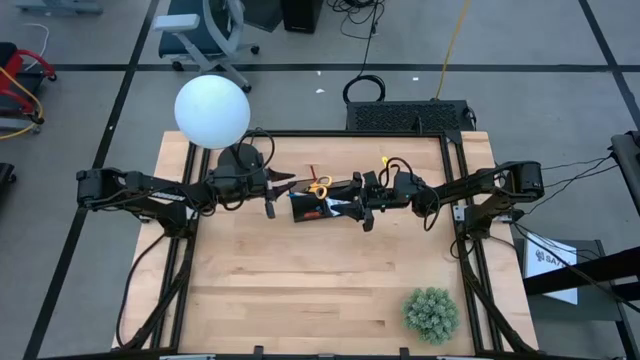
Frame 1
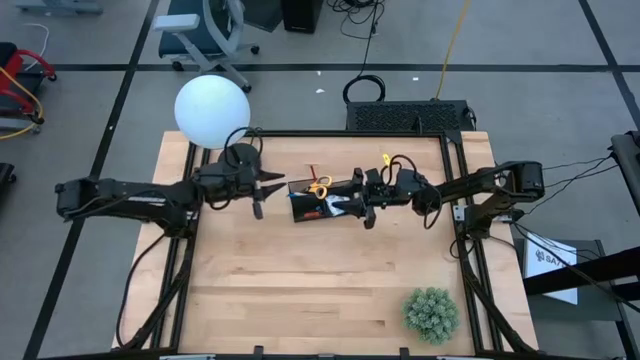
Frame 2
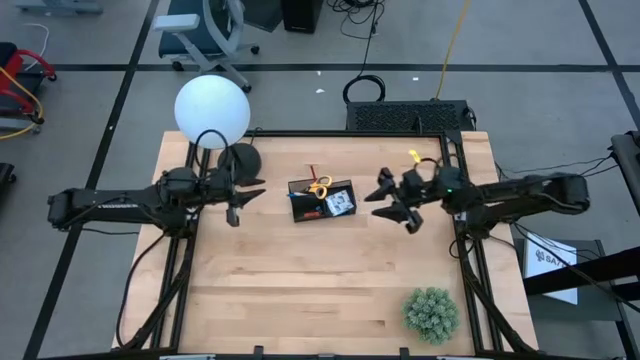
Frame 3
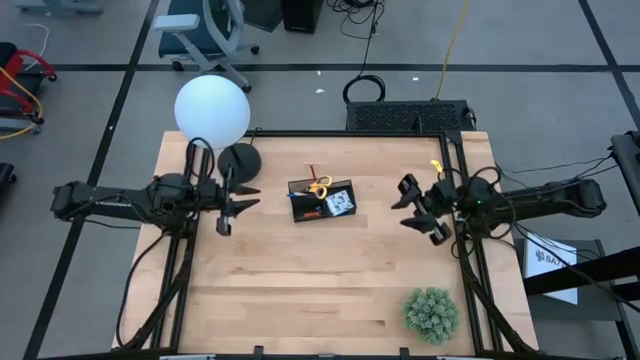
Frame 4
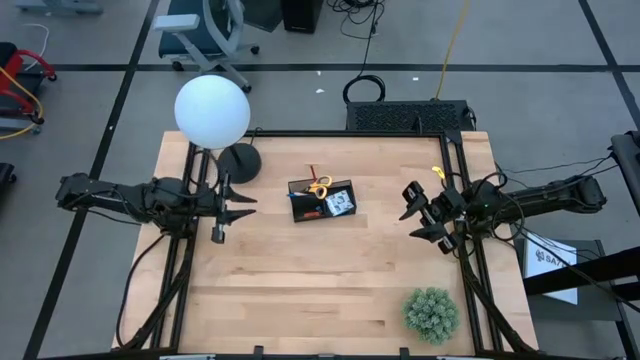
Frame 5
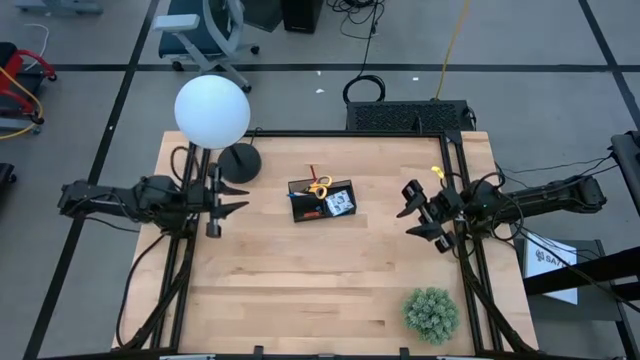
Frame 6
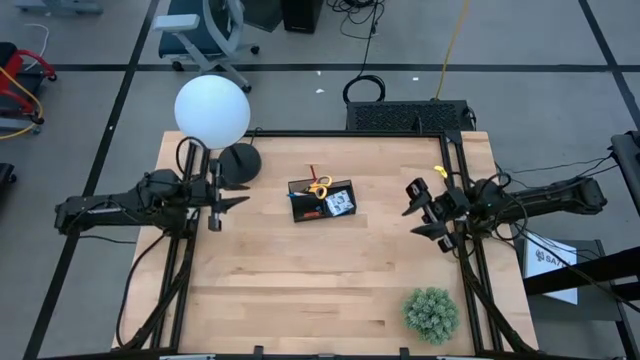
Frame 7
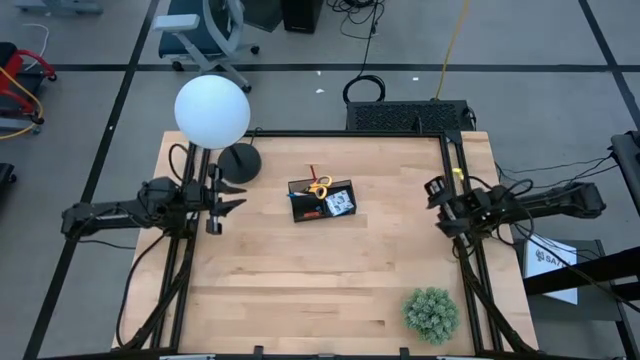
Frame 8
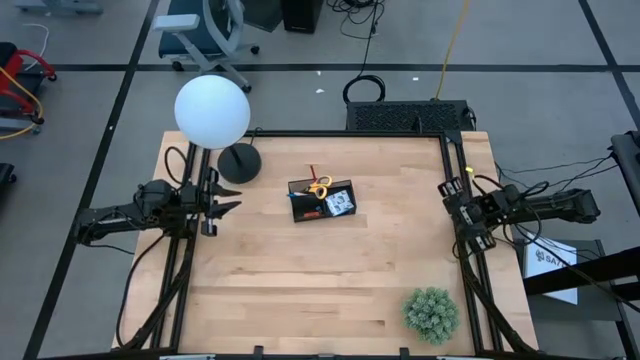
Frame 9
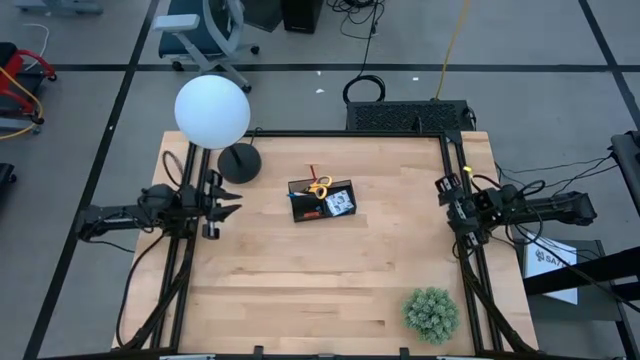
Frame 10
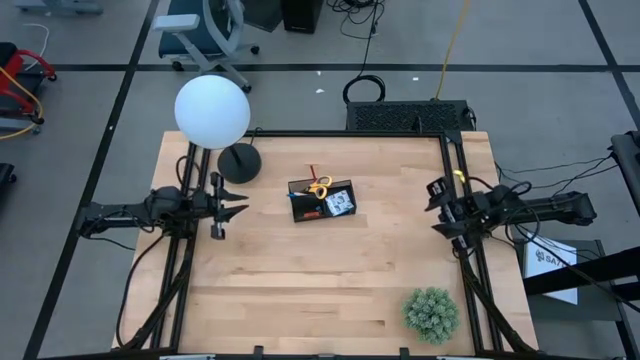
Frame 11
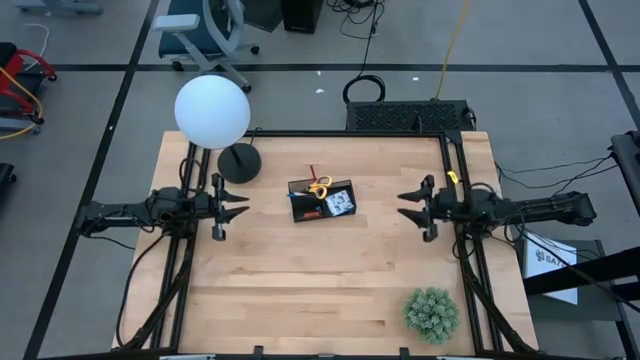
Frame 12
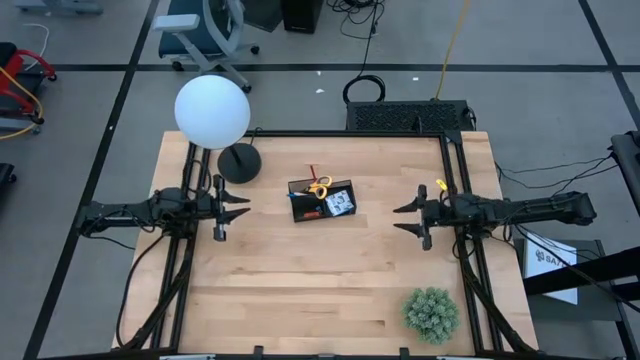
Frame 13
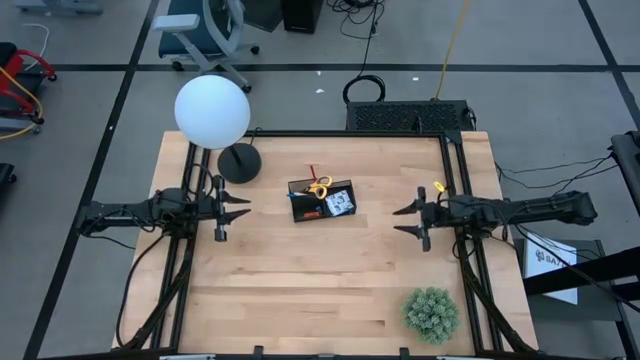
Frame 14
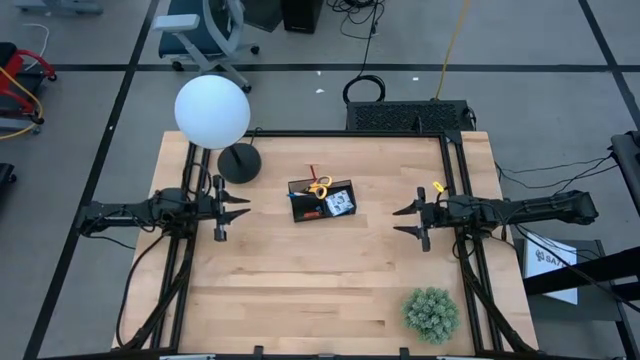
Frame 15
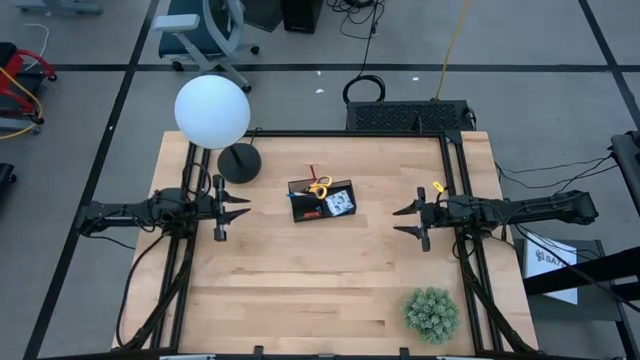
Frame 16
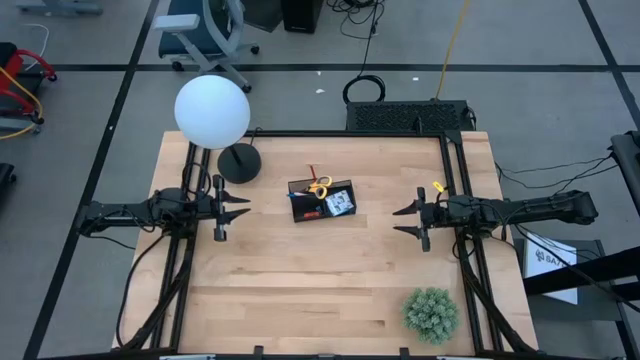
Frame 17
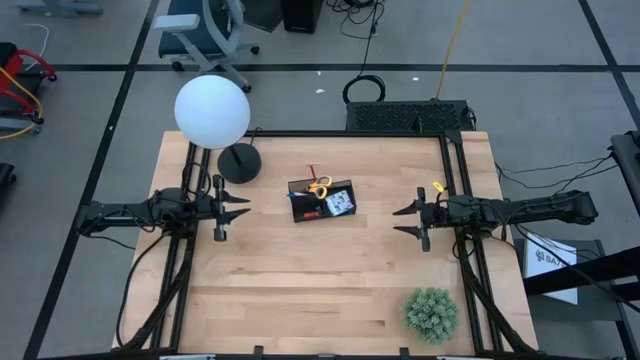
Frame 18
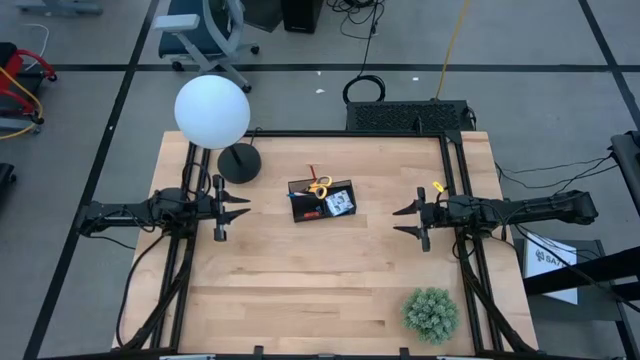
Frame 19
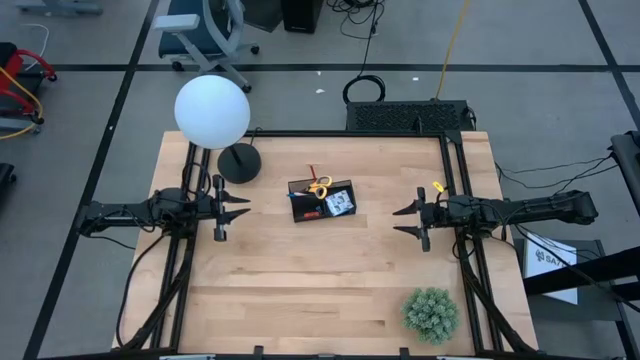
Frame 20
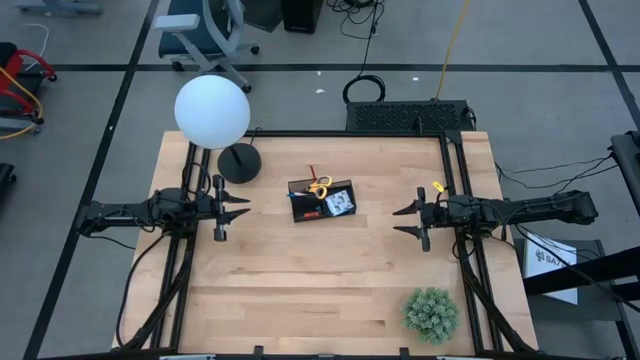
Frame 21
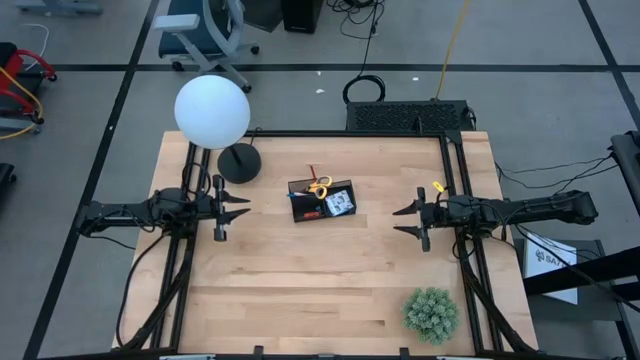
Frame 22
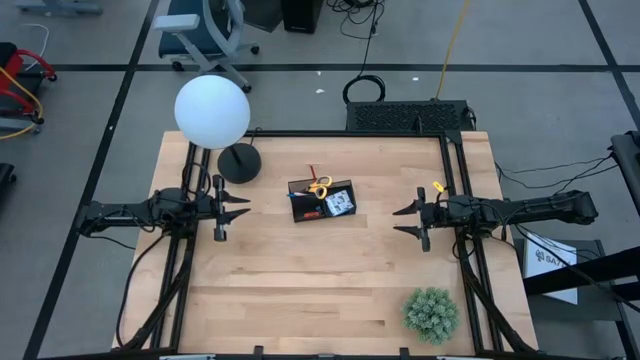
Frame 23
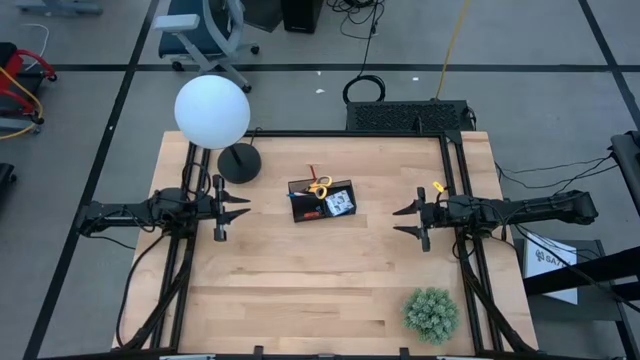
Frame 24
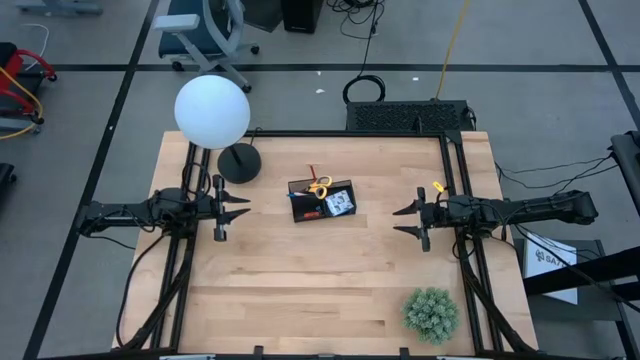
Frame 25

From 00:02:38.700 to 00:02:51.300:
Task: Pick and place office supplies into organizer
Return to Home Position

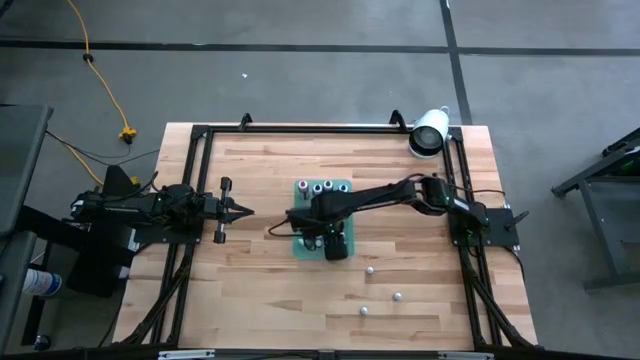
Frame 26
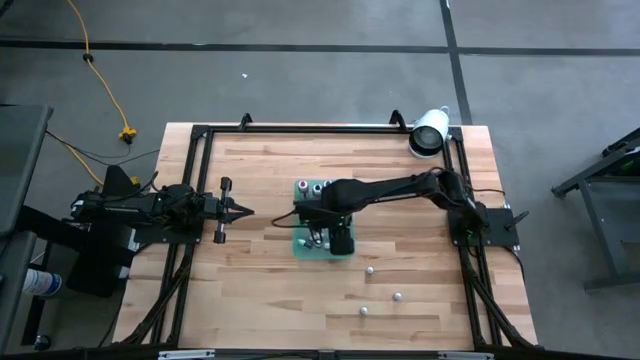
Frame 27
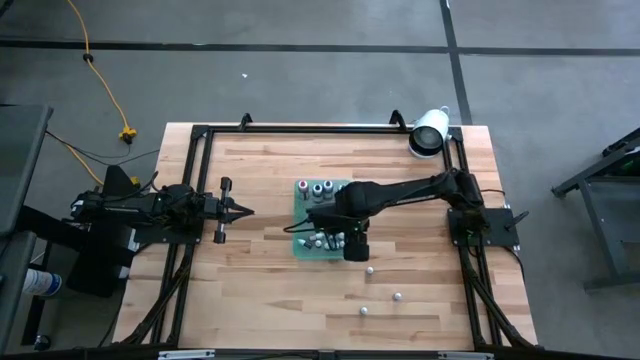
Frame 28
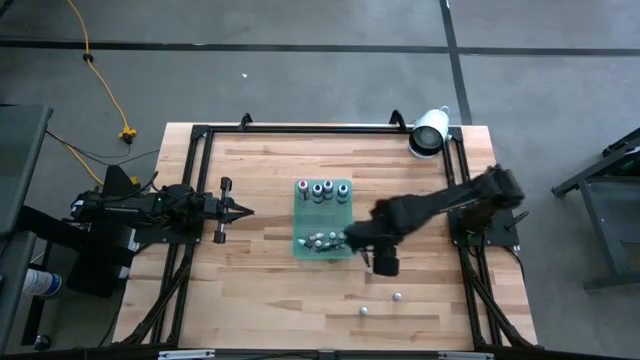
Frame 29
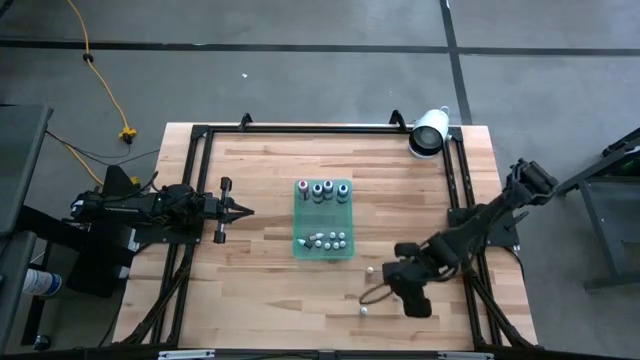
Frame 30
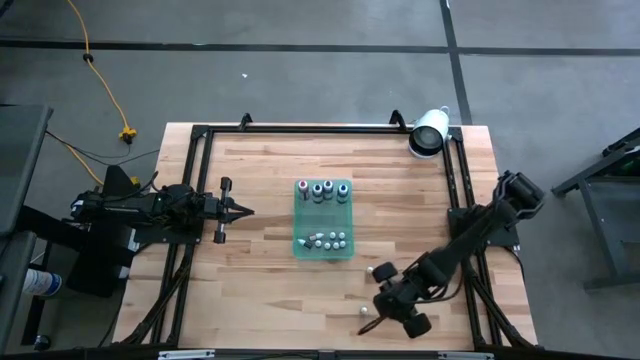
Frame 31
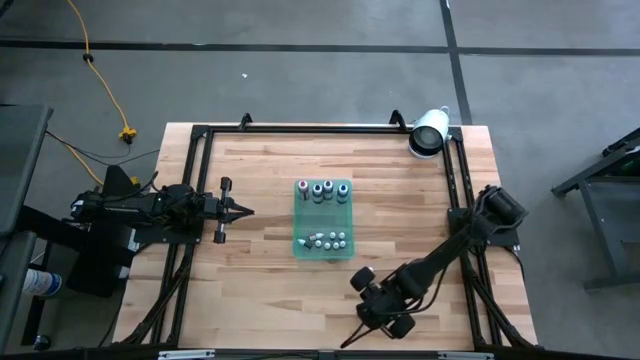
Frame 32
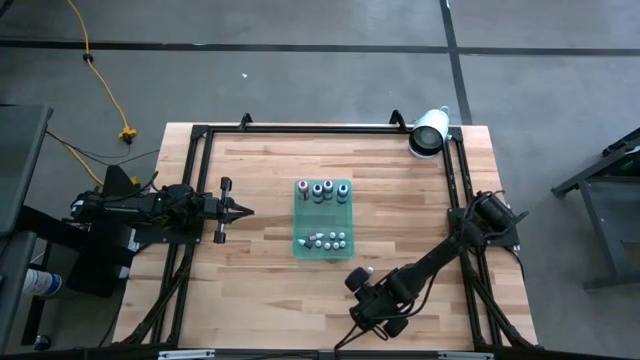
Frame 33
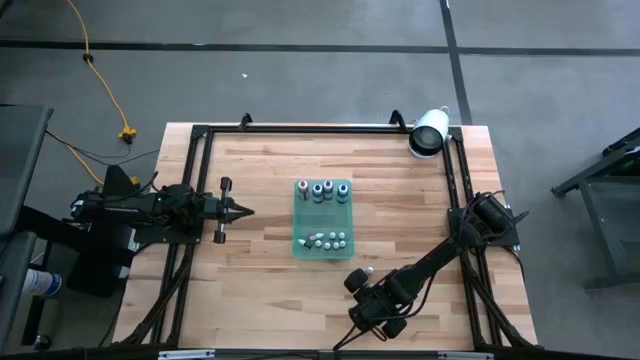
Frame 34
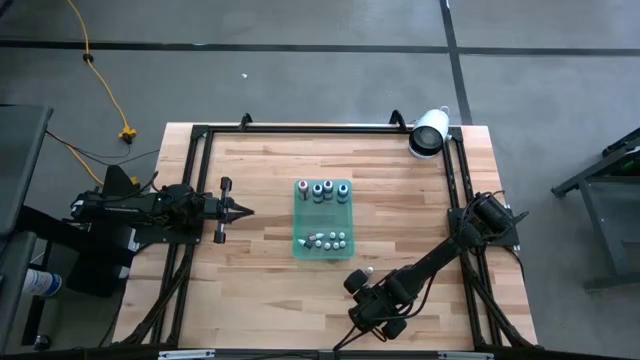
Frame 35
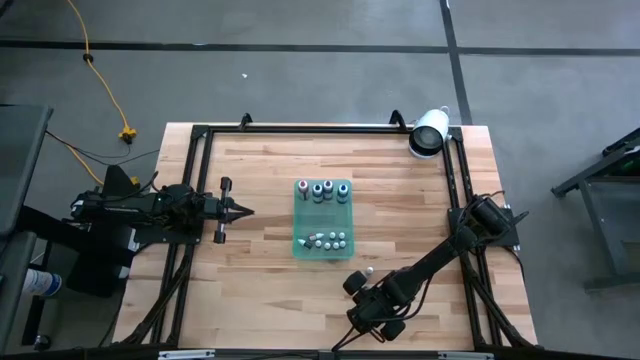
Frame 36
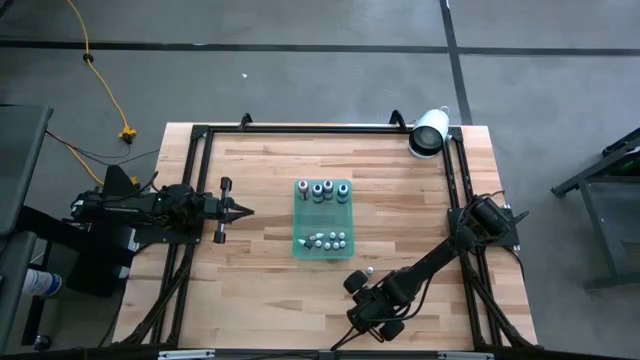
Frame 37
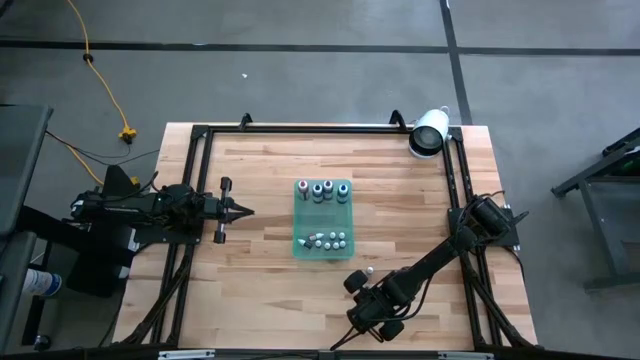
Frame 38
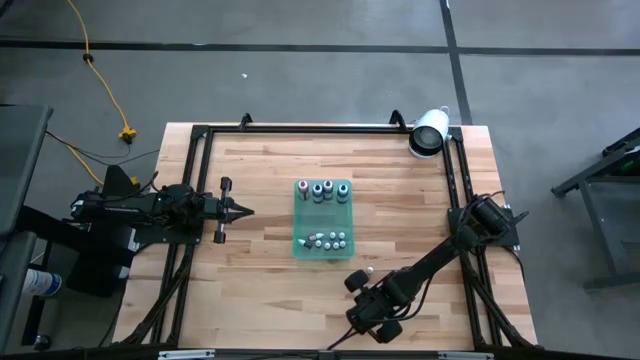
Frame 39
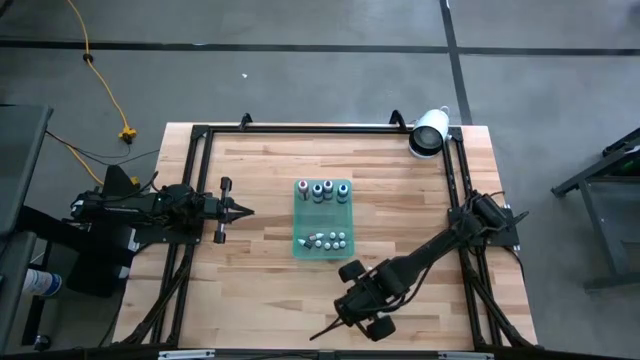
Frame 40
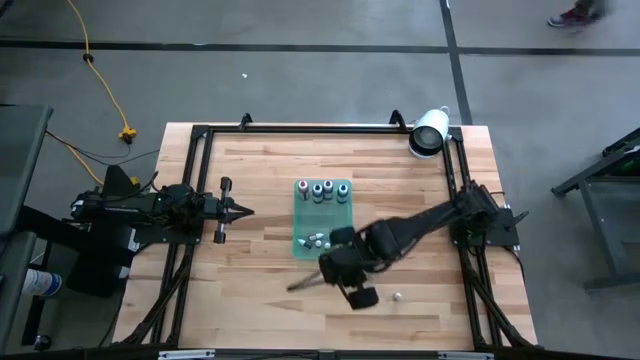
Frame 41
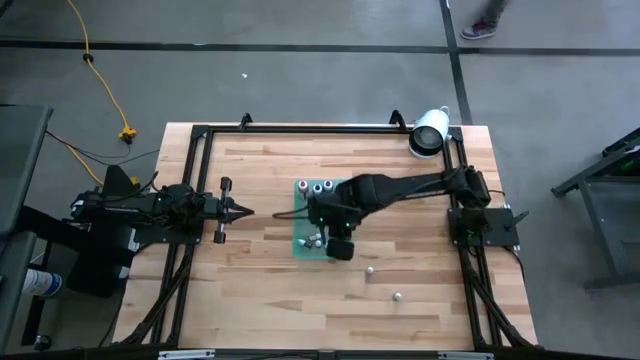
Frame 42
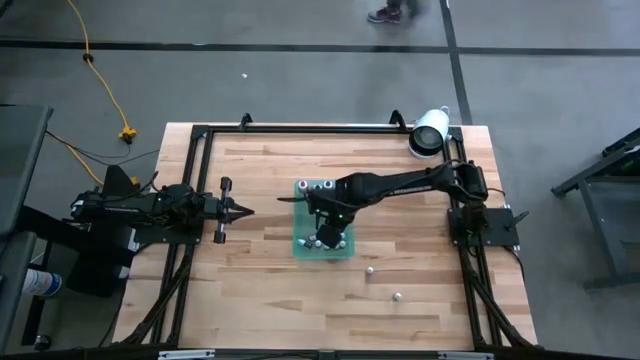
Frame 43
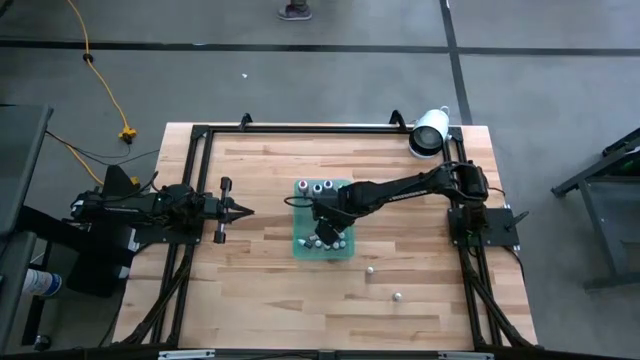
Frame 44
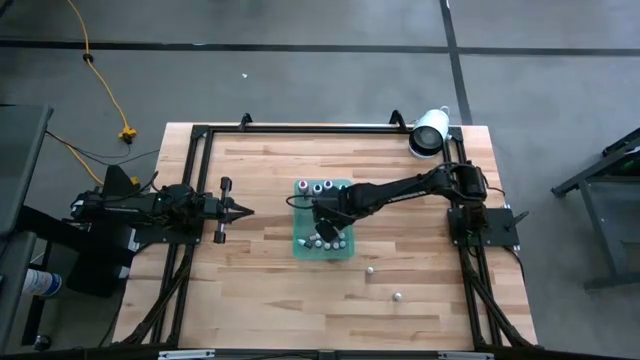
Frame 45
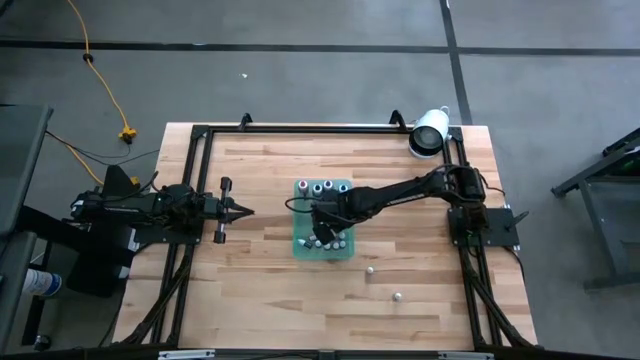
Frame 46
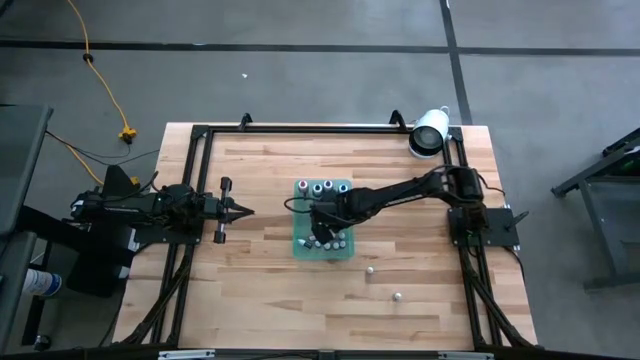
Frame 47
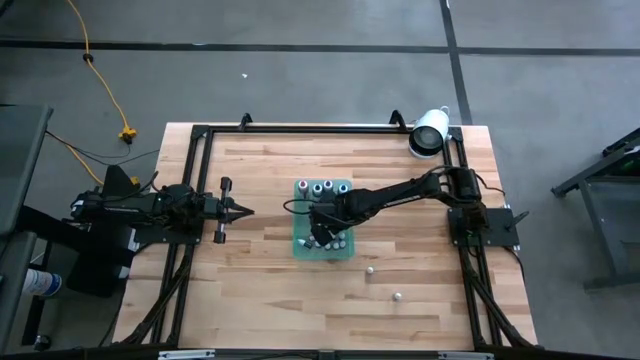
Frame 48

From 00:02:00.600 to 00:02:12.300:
Task: Pick & Place food coloring
Put the small green food coloring bottle into the green bin
